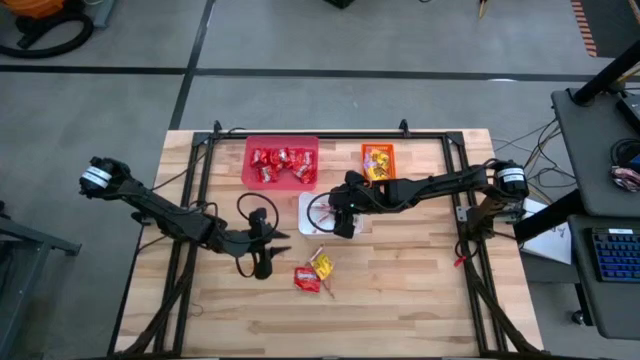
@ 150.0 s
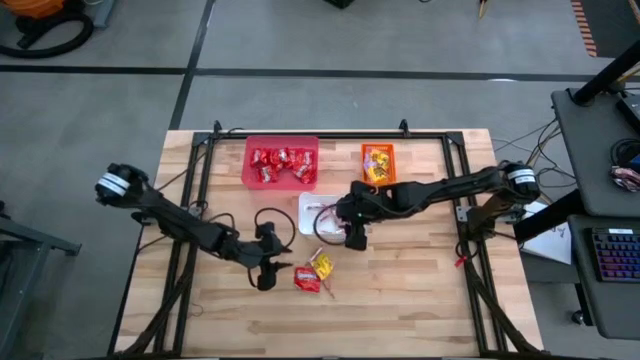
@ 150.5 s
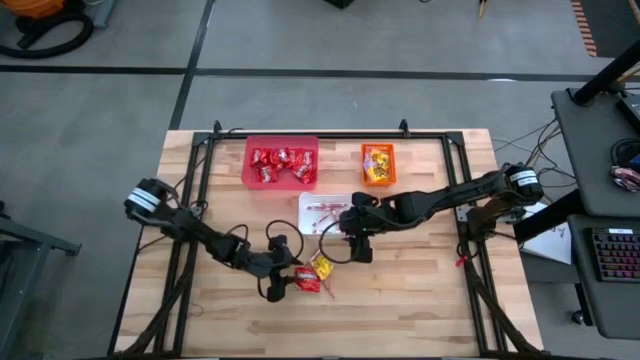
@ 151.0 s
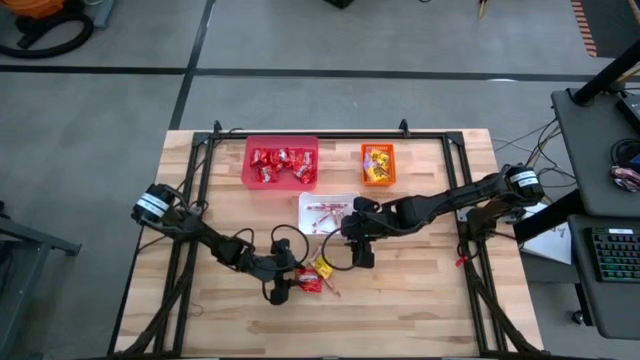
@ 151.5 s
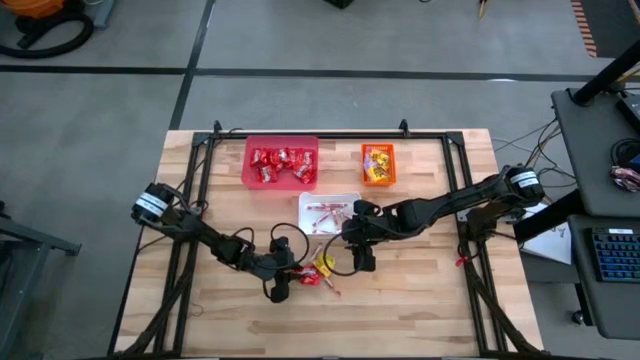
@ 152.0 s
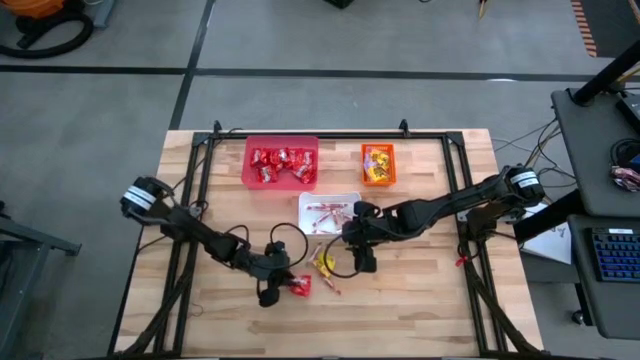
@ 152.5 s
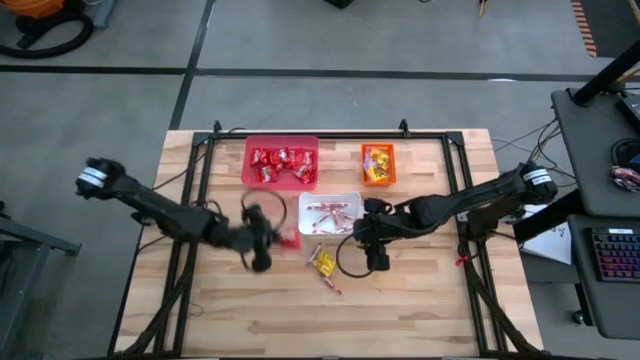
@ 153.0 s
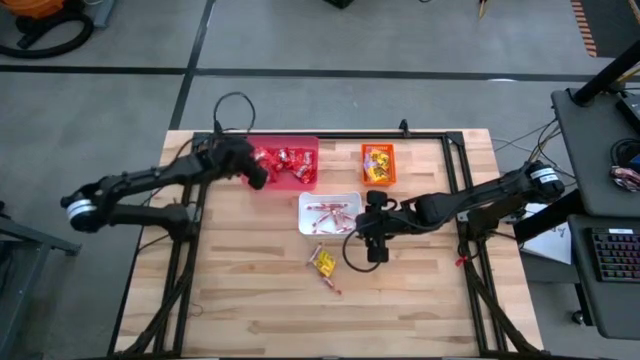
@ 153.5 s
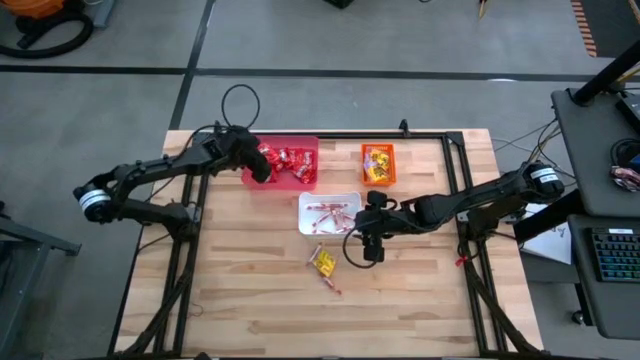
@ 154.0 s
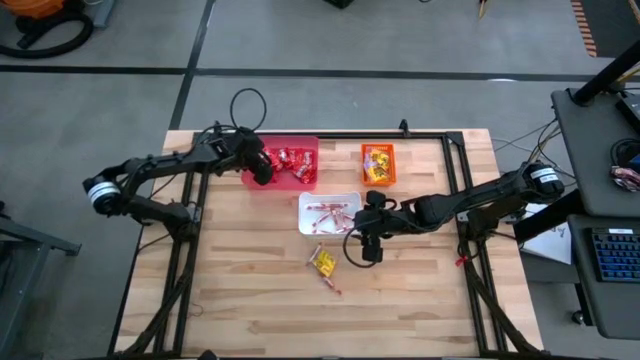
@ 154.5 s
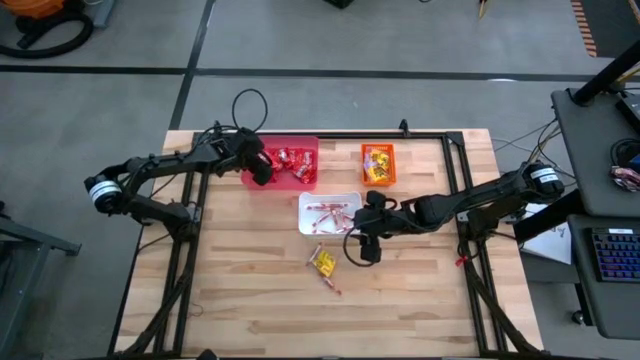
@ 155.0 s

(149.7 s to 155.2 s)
Task: Sort candy
Put the red chocolate into the red bin

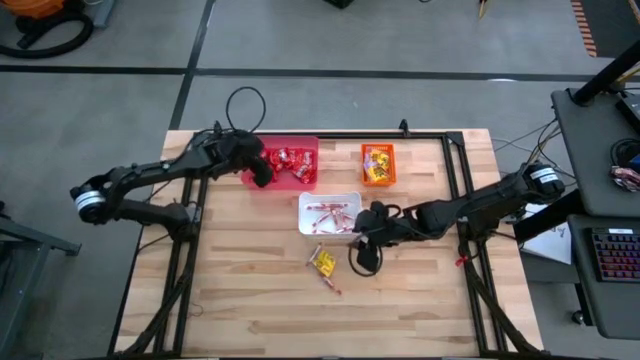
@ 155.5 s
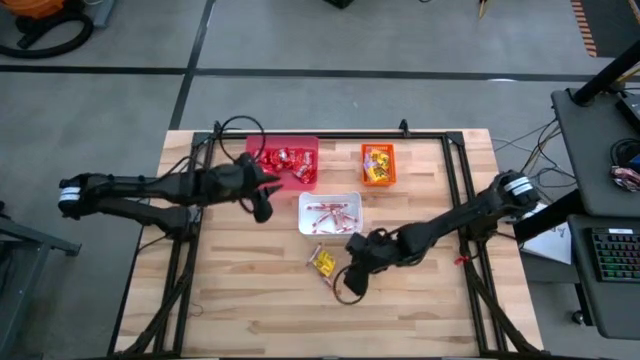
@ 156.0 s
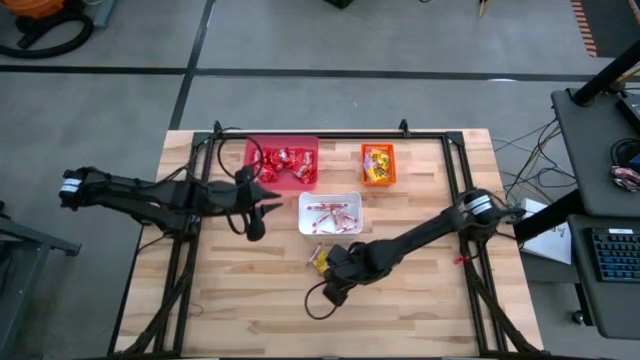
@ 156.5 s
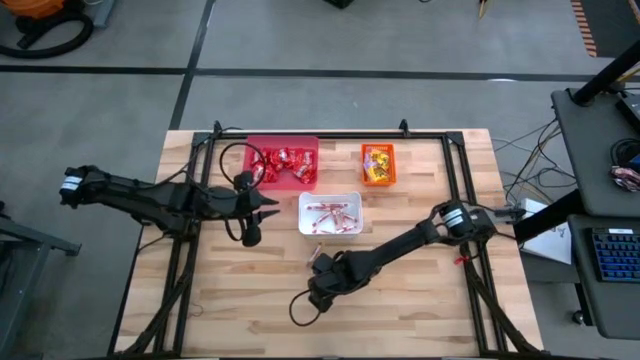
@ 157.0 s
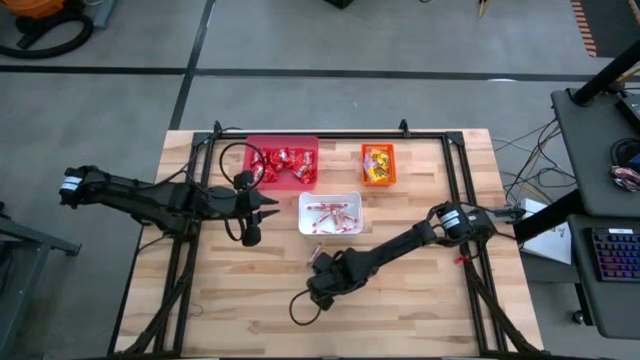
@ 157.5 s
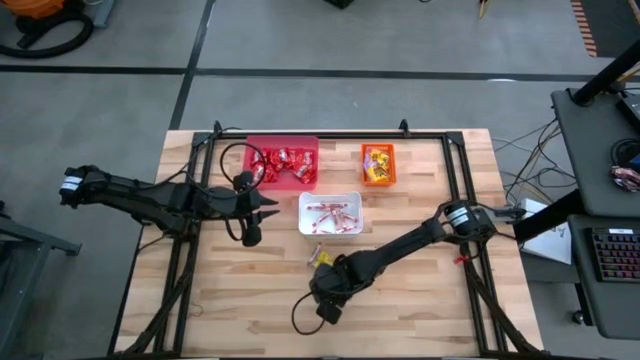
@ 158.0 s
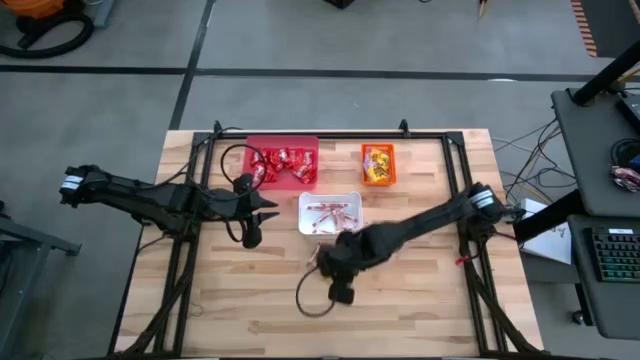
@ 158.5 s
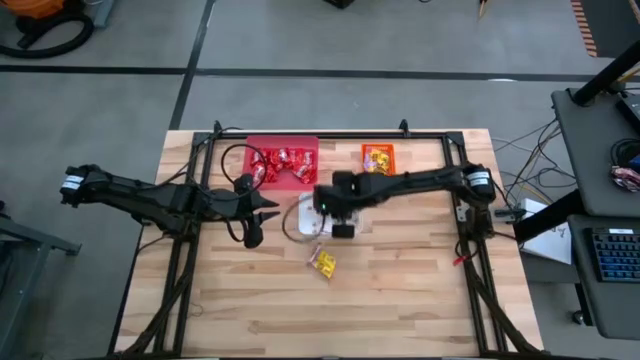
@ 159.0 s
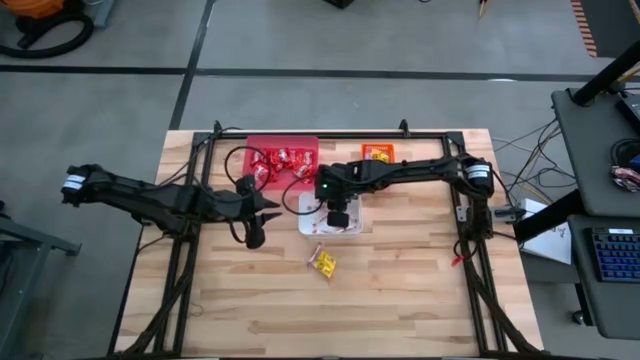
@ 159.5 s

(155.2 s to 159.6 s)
Put the white candy into the white bin

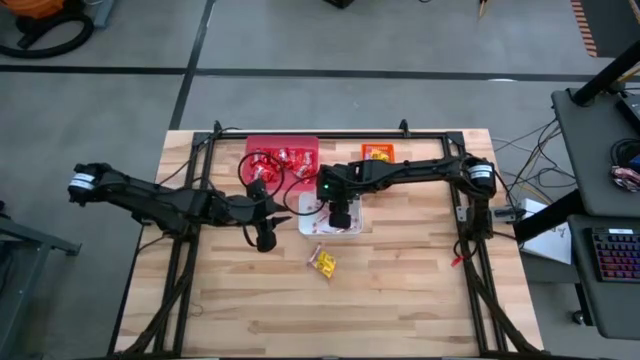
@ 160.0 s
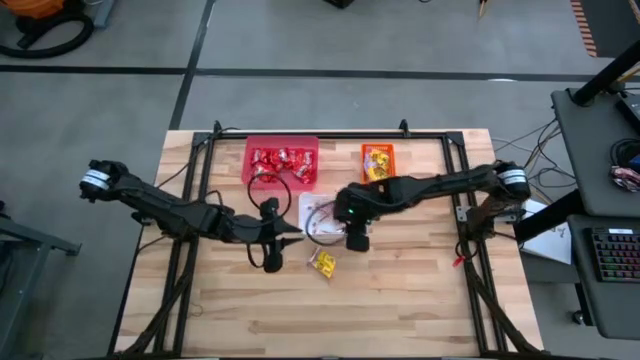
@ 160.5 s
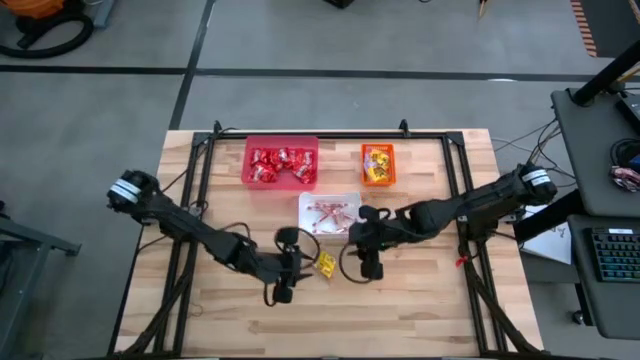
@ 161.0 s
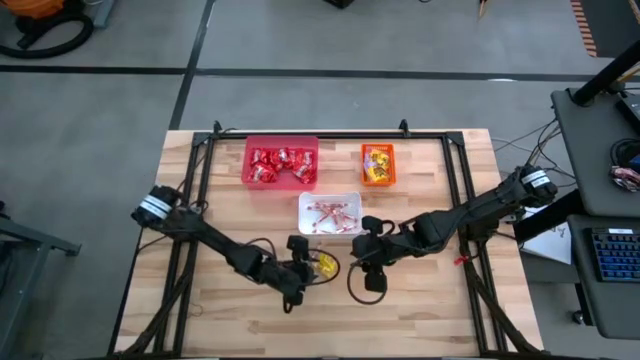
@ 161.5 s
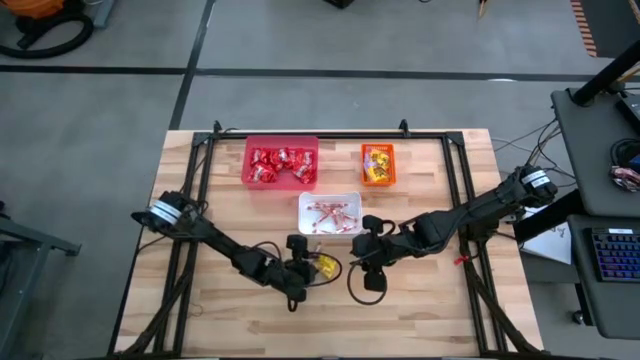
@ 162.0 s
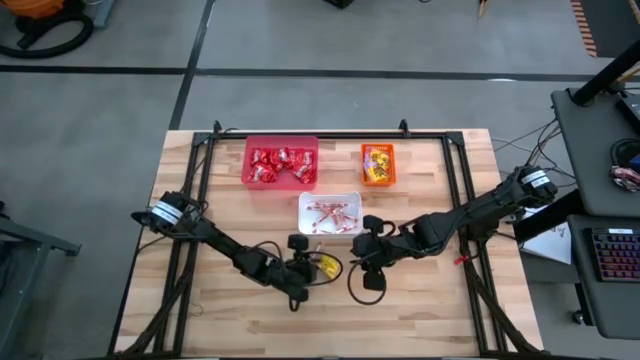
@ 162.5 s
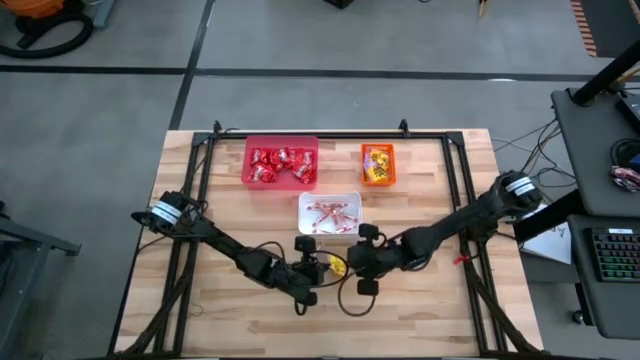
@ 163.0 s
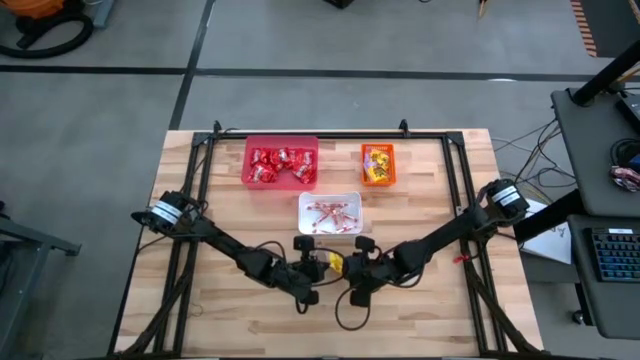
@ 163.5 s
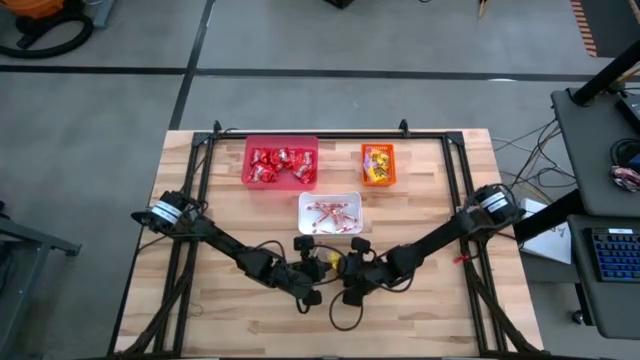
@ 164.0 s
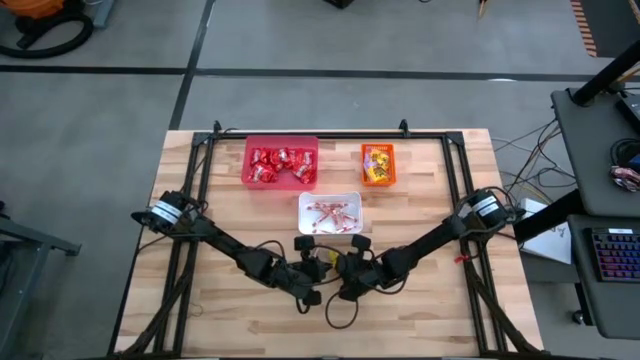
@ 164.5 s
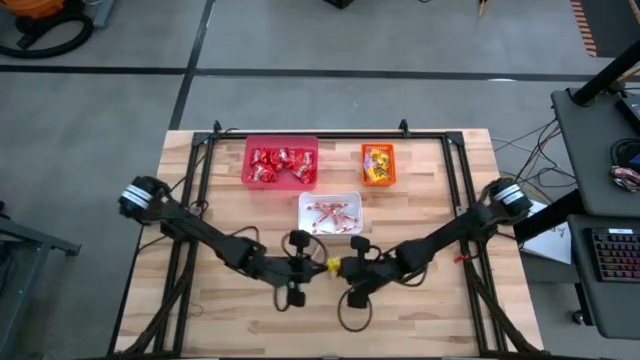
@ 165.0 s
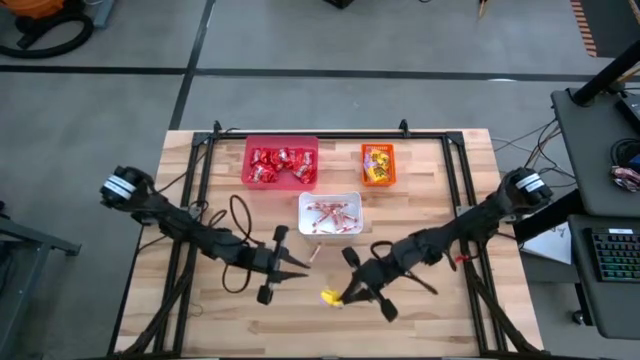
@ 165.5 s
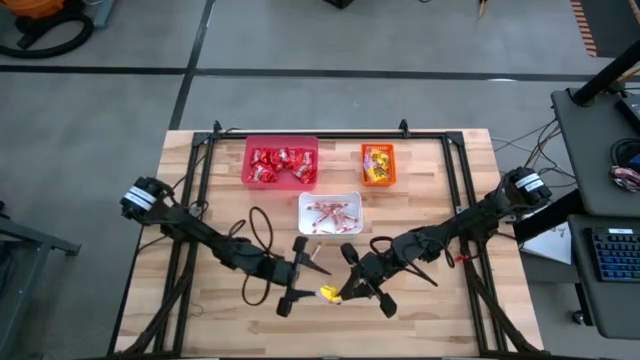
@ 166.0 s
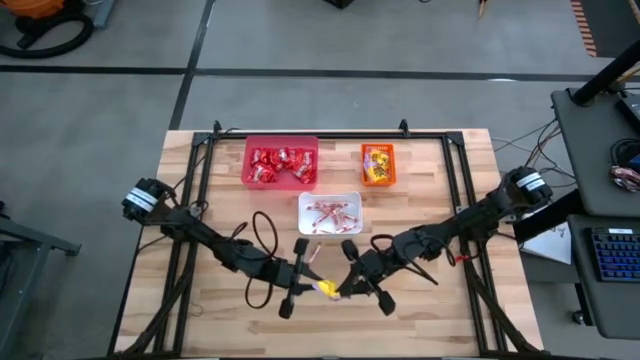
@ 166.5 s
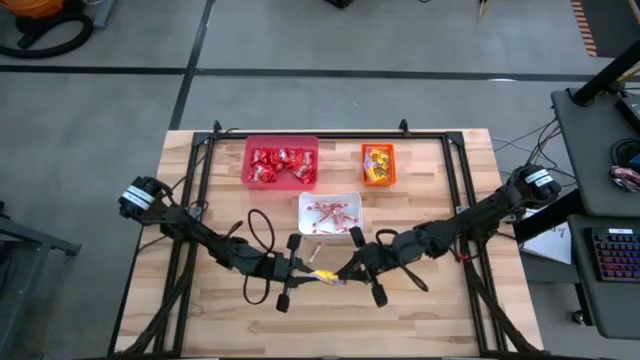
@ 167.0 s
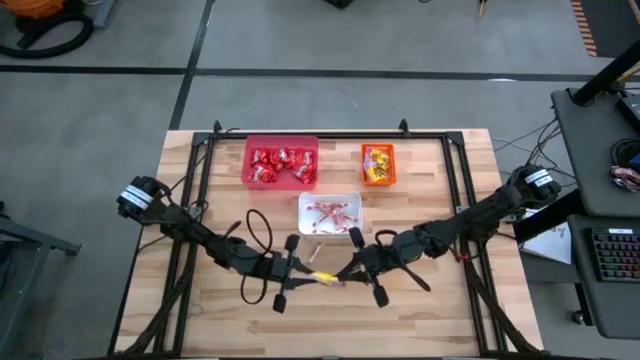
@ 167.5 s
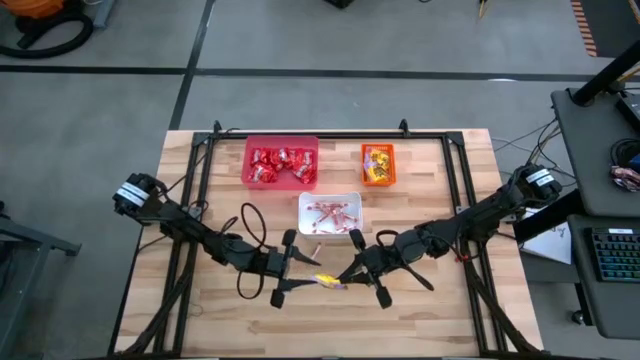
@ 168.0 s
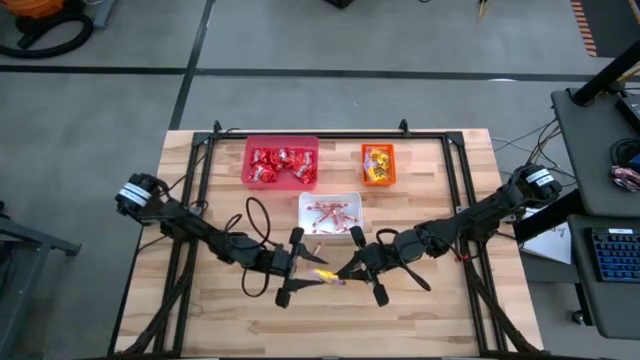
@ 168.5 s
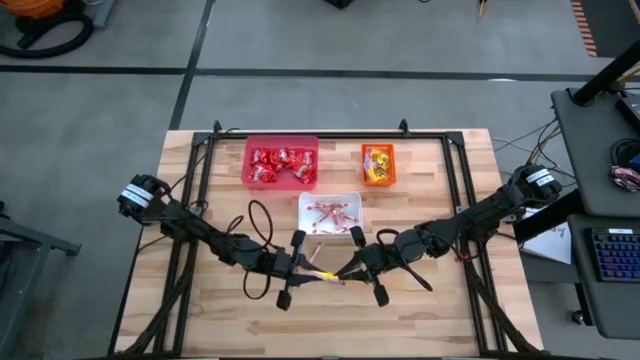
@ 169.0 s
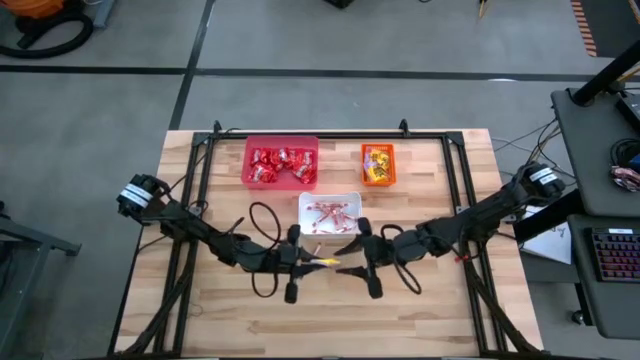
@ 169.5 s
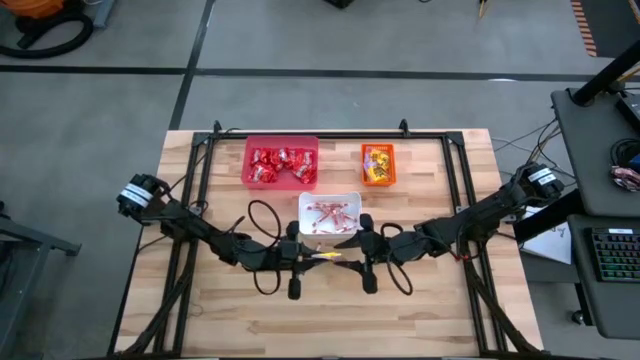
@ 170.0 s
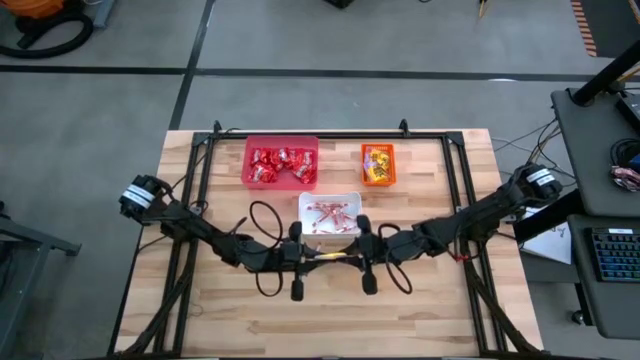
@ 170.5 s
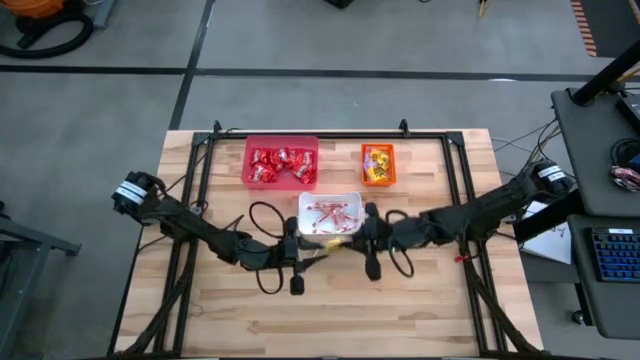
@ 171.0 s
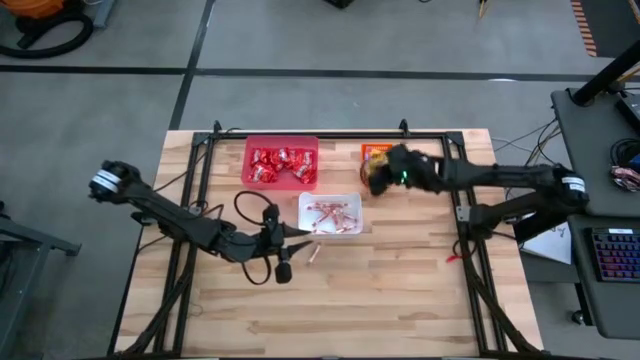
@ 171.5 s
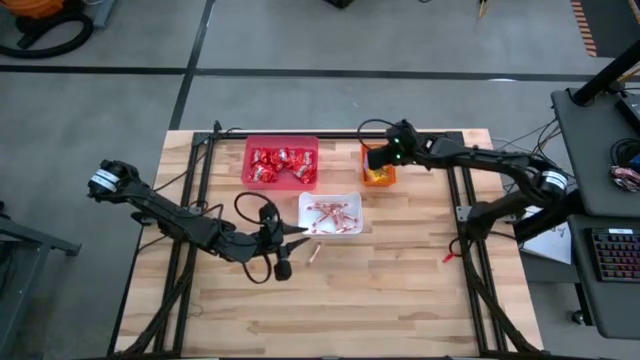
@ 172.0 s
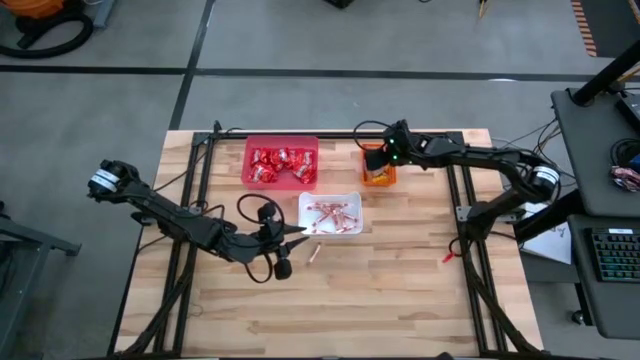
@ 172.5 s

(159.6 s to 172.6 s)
Put the yellow candy into the orange bin

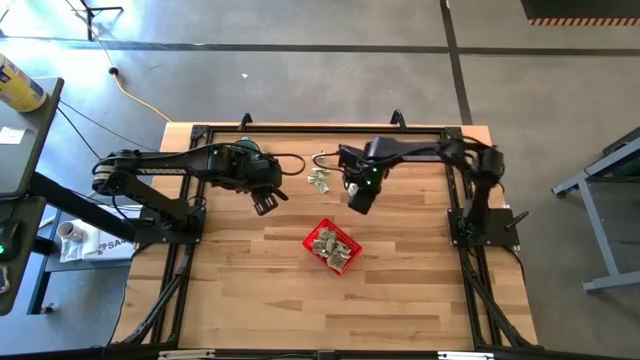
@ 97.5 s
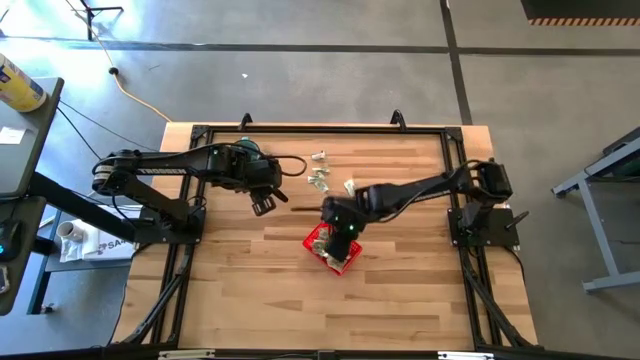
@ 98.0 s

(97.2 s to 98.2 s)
Task: Pick and place Stevia / Truvia into bins
Put the light green stevia packet into the bin
